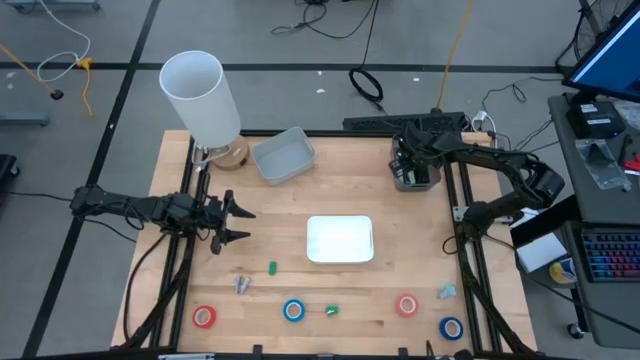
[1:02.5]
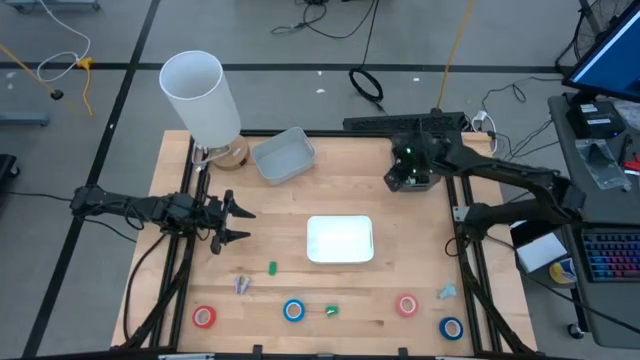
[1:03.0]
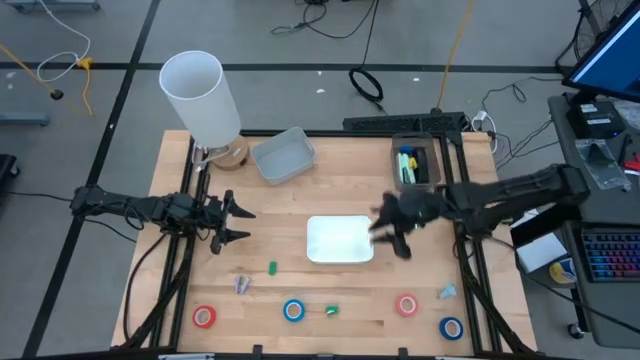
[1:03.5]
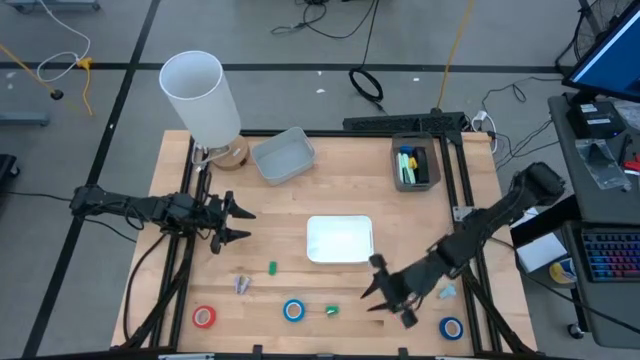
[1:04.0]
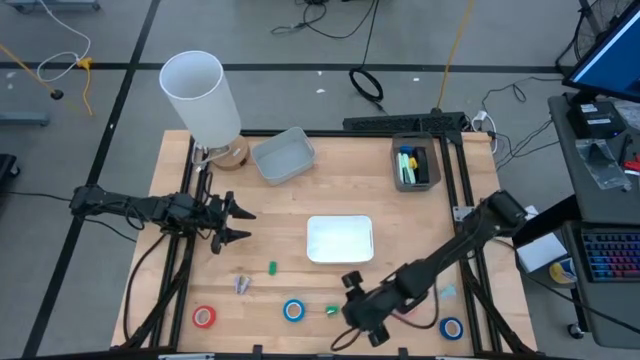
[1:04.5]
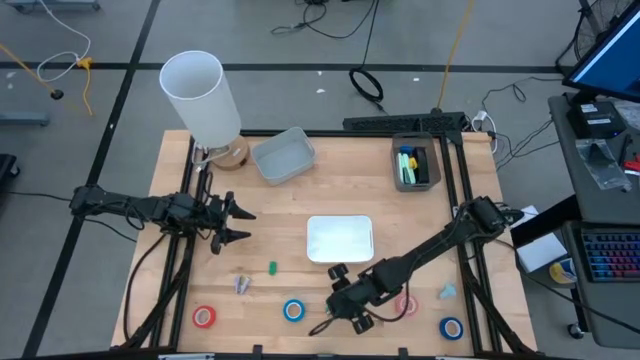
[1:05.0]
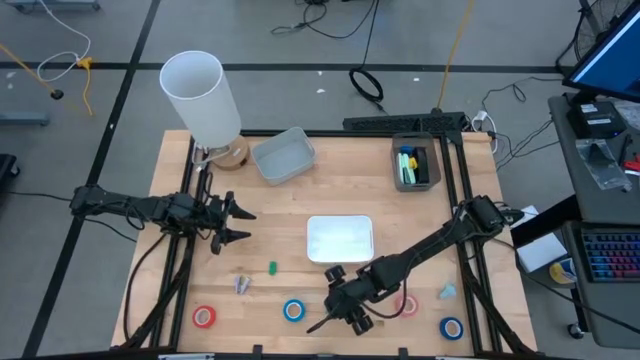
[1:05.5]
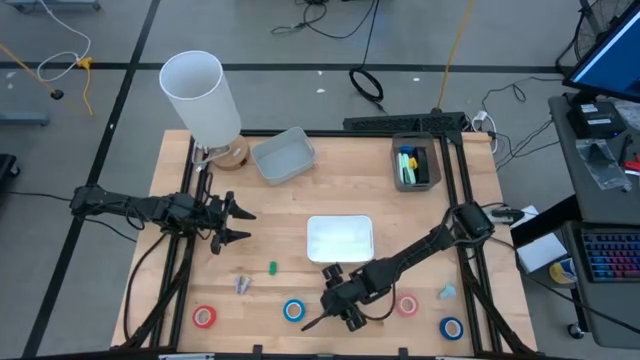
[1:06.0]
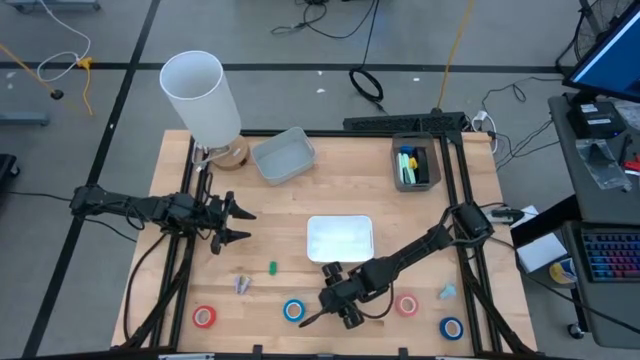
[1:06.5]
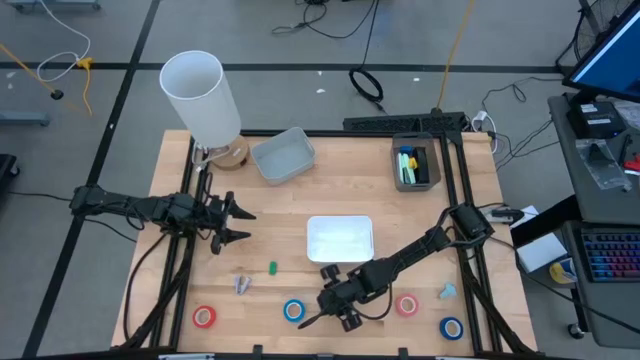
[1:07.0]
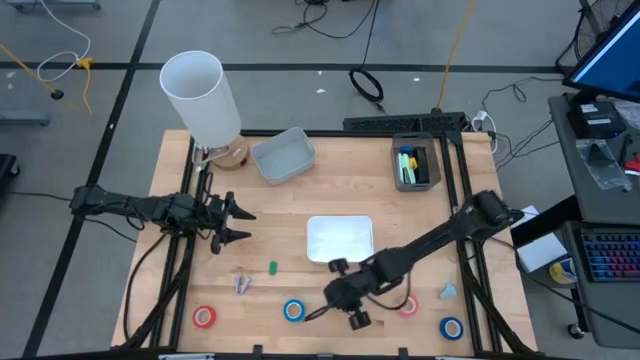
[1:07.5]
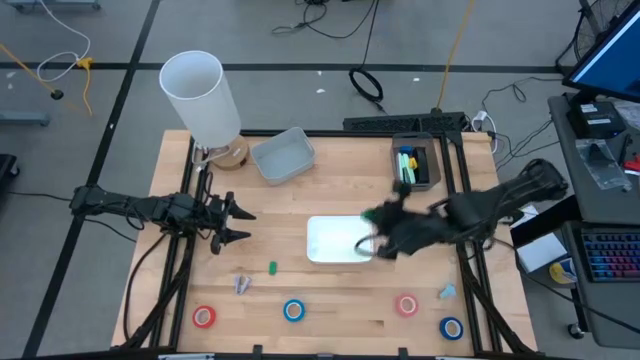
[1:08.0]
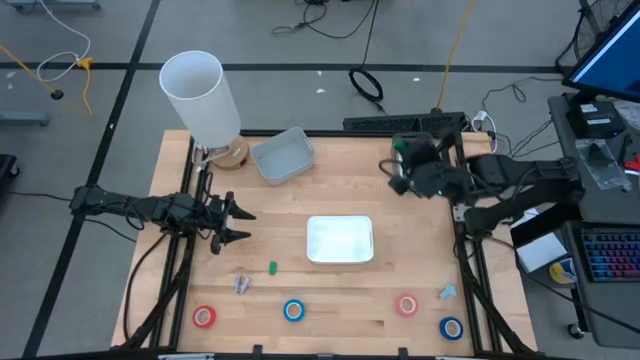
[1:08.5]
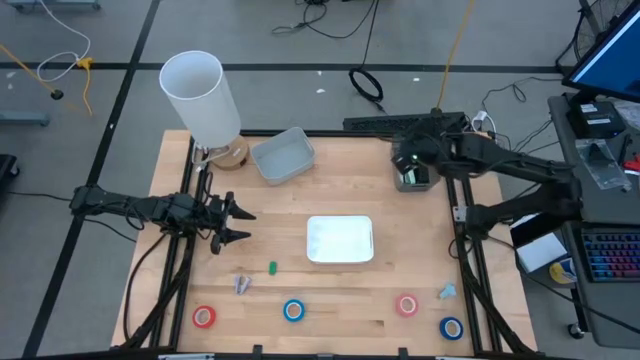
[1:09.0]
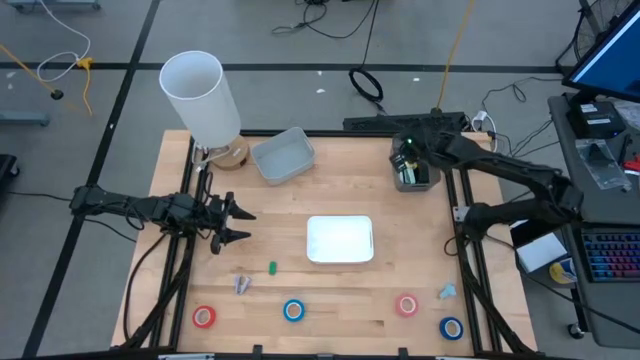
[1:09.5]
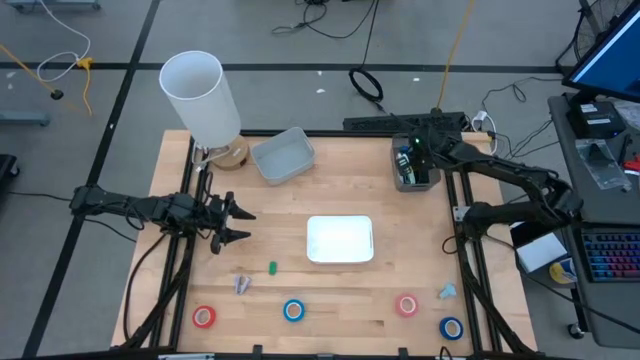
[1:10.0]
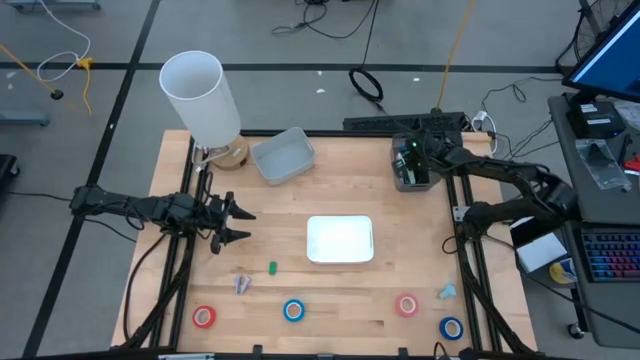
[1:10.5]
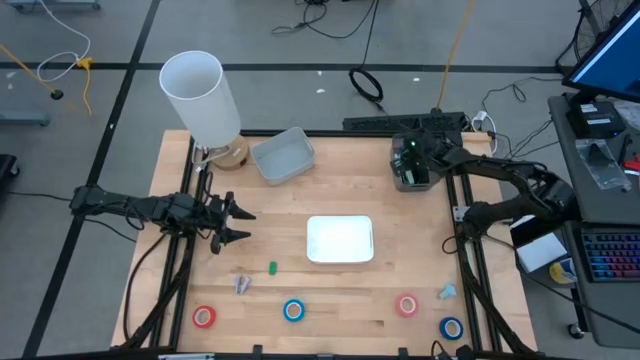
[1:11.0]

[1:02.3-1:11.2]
Task: Pick and place Stapler, Stapler remover, tape
Put the right green stapler into the black bin

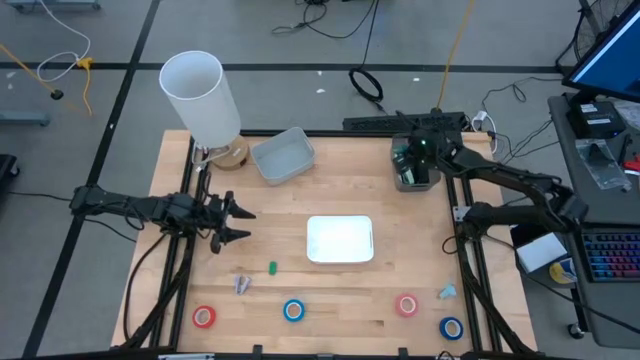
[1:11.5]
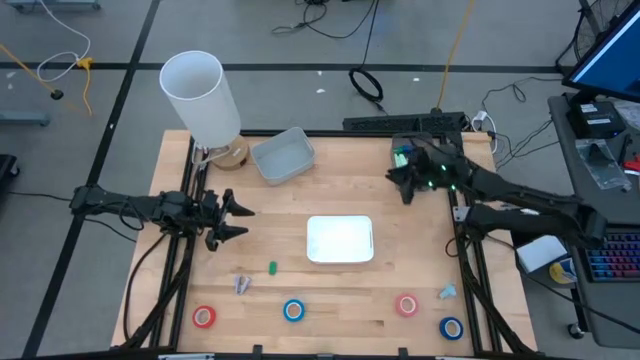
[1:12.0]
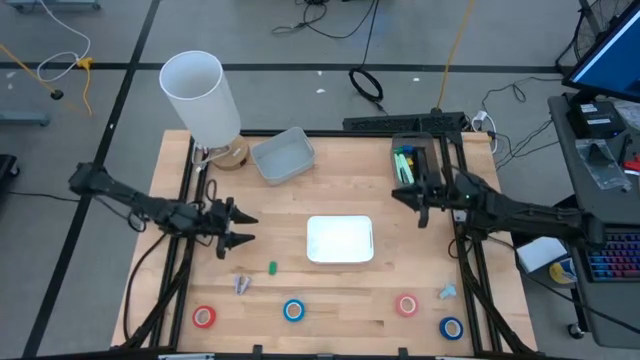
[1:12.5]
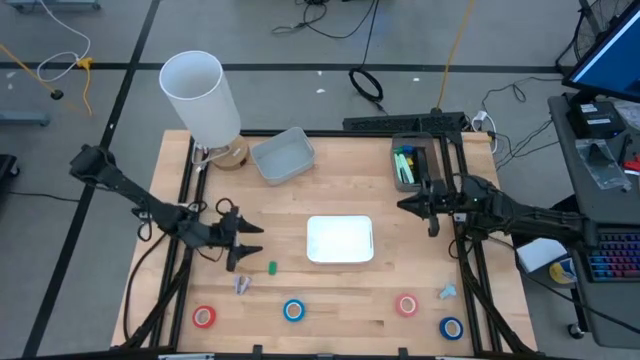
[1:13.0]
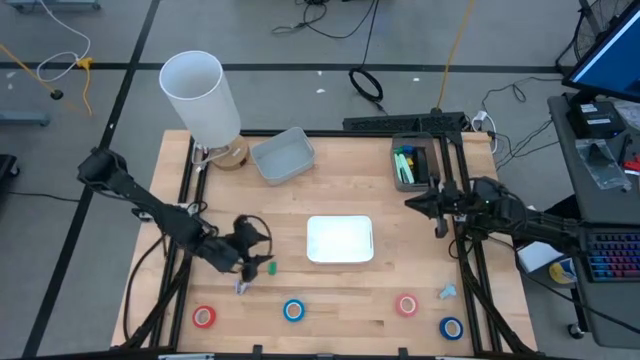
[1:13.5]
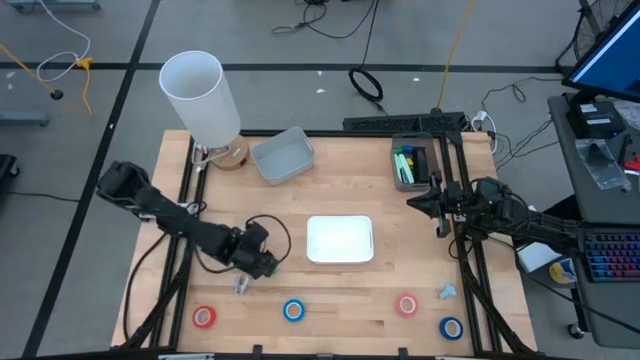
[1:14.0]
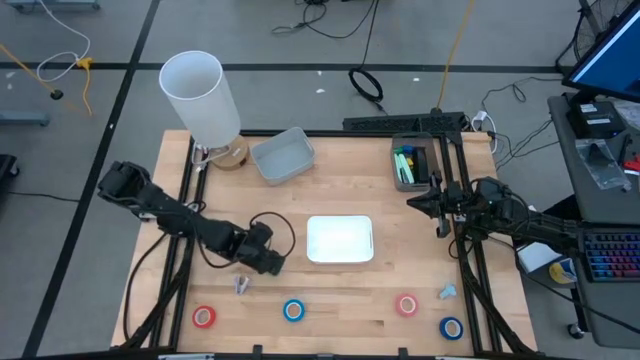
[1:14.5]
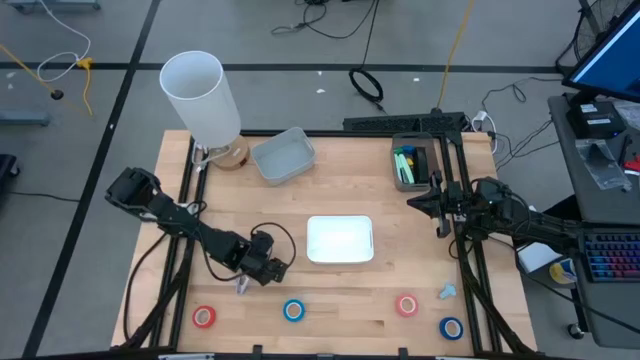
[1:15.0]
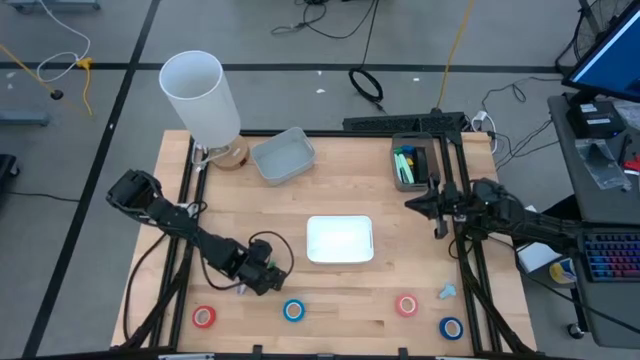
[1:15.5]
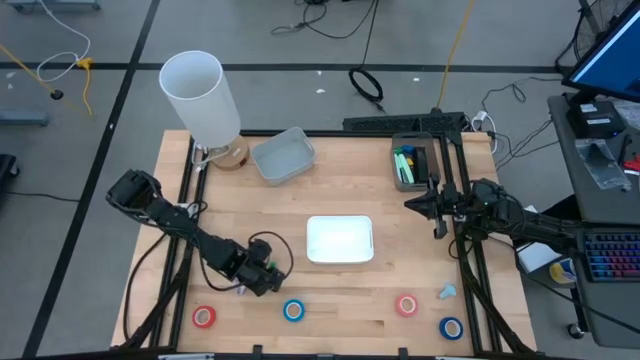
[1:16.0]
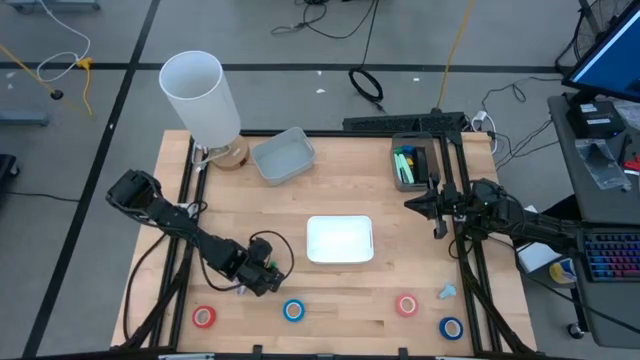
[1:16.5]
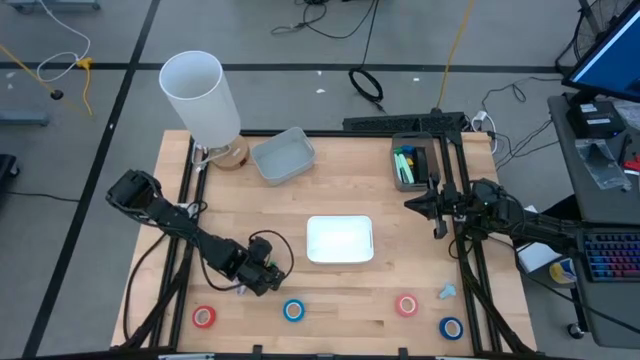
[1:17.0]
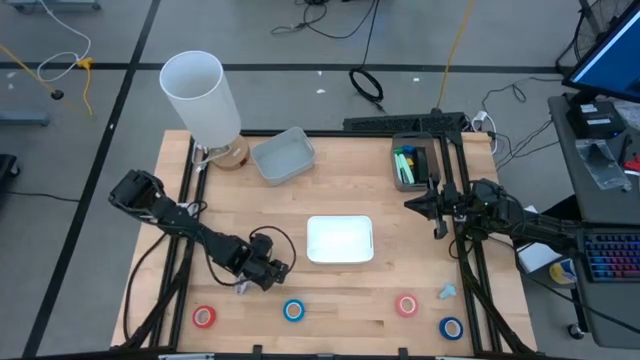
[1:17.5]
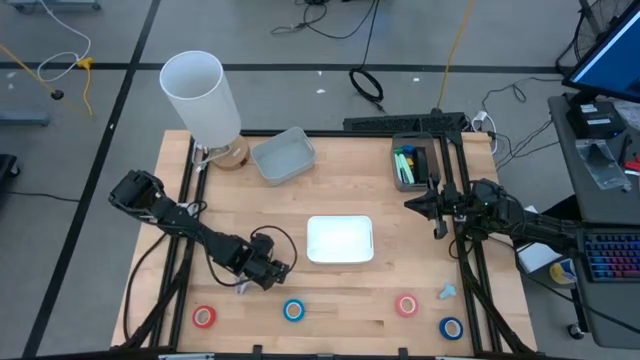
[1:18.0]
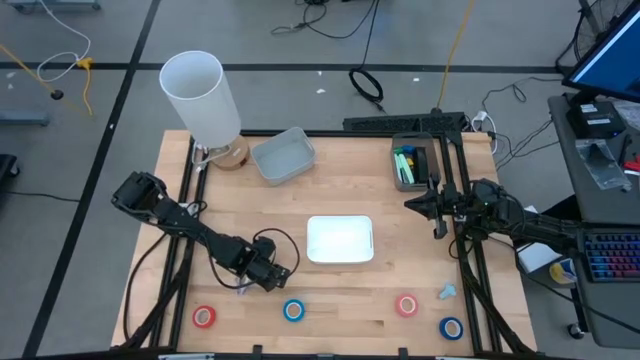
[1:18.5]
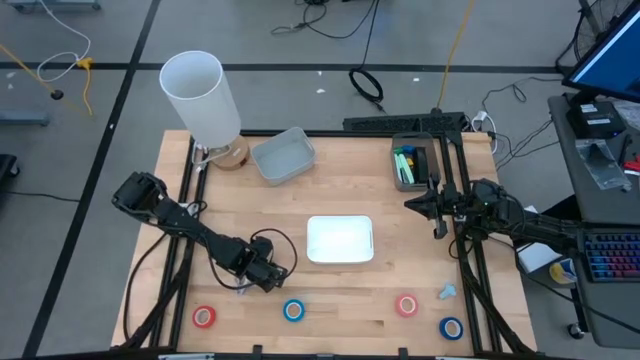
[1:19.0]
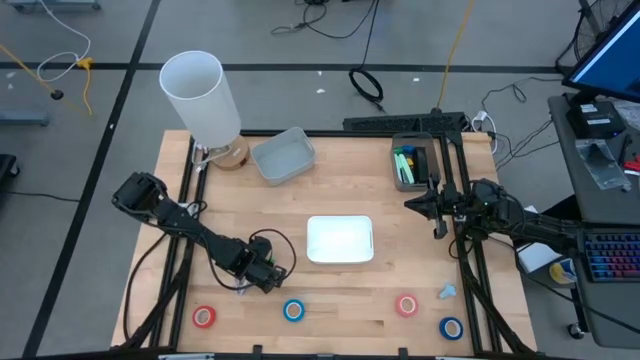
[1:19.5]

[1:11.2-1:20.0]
Put the green stapler into the black bin

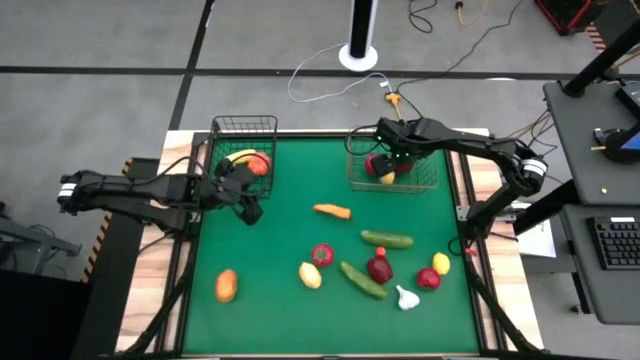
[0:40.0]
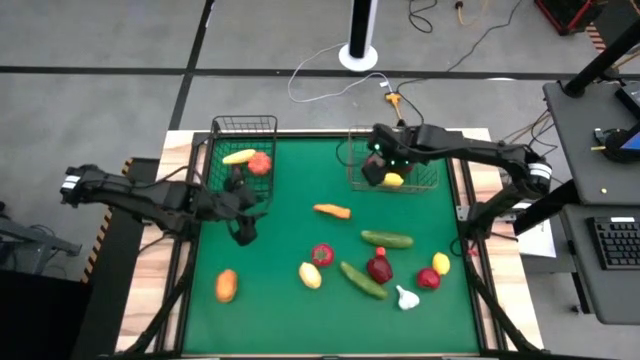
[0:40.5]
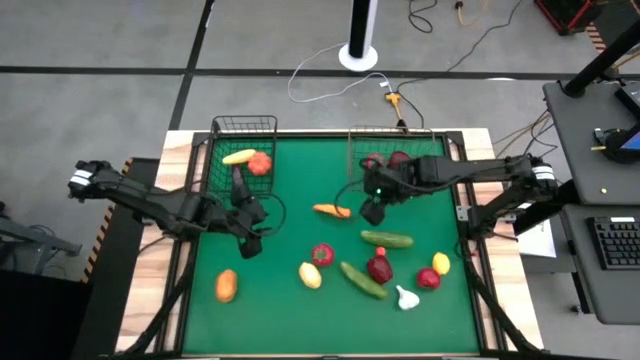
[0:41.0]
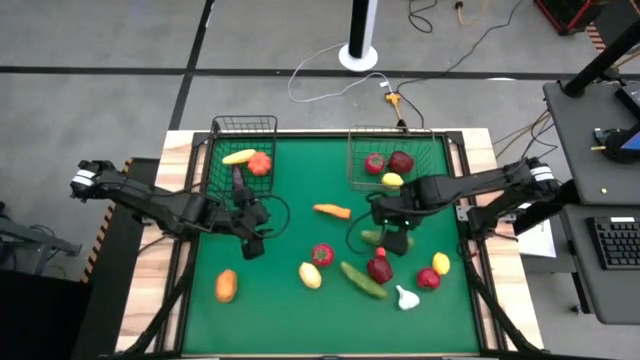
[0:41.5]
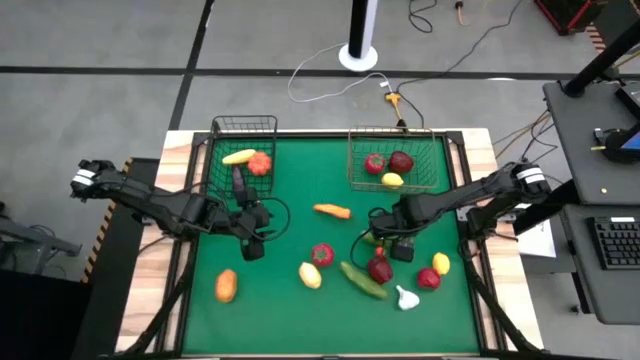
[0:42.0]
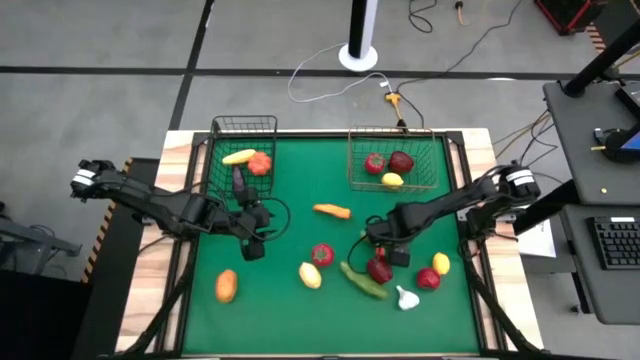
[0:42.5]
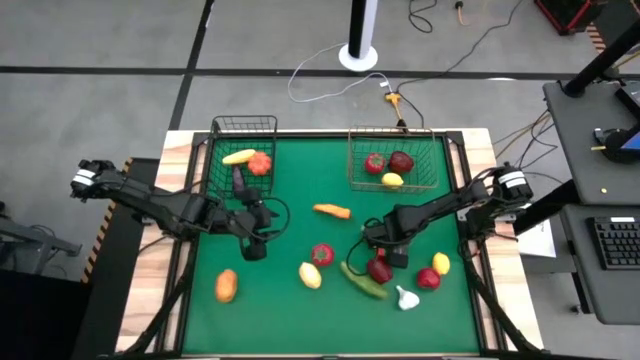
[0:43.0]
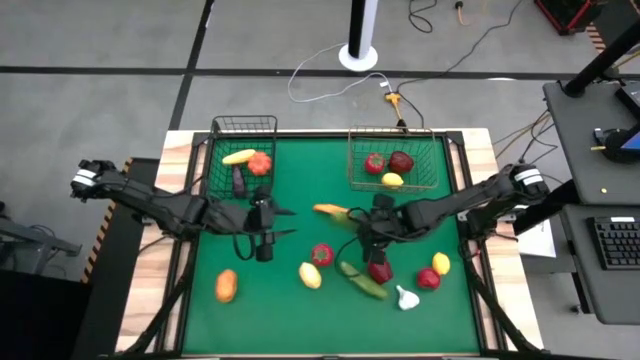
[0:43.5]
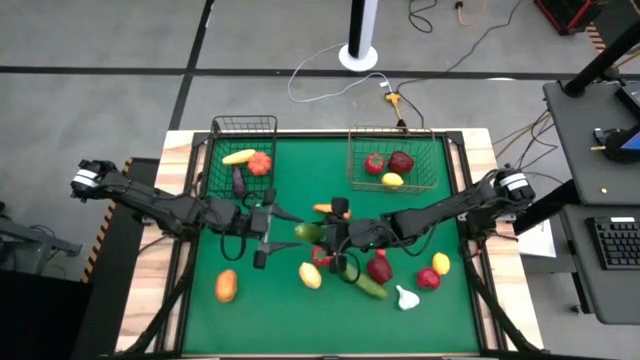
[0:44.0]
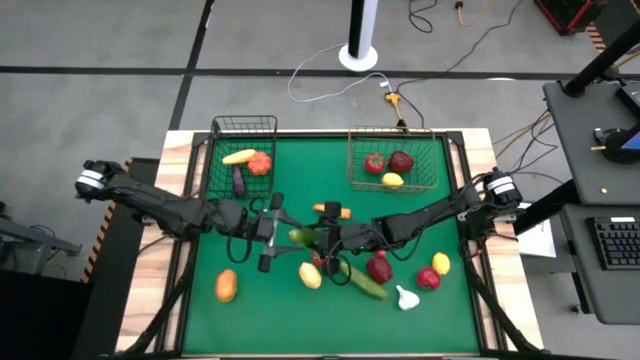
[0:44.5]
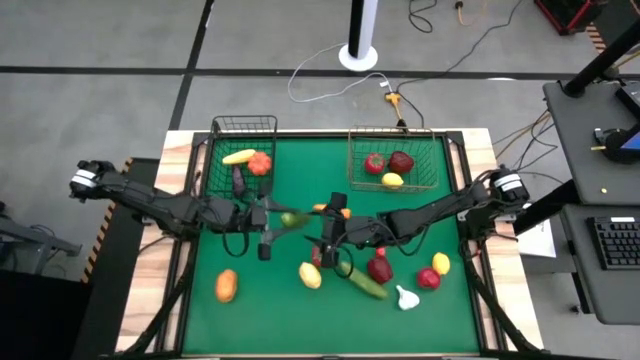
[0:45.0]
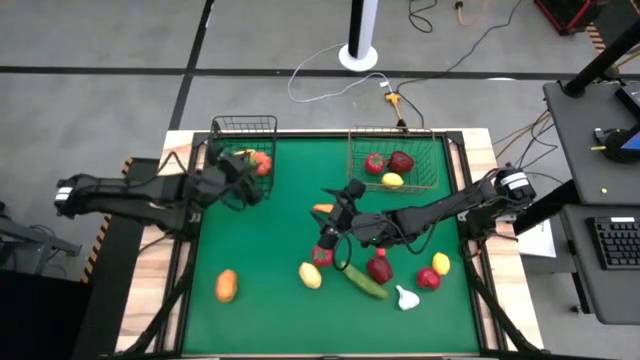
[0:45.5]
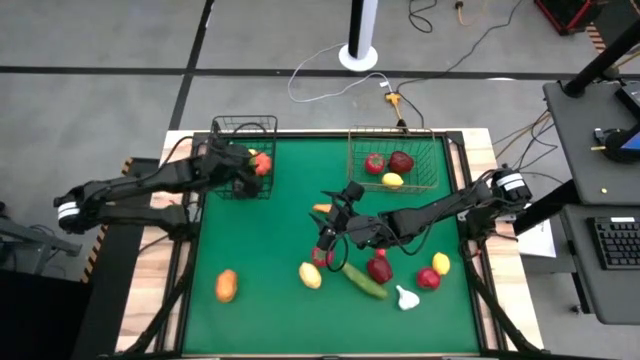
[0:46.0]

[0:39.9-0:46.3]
Task: Sort produce into baskets
Put the top green cucumber into the left wire basket
